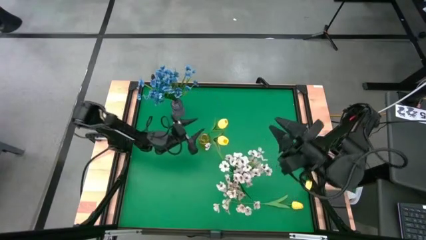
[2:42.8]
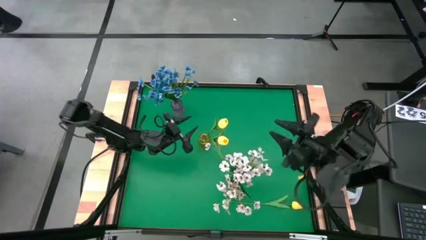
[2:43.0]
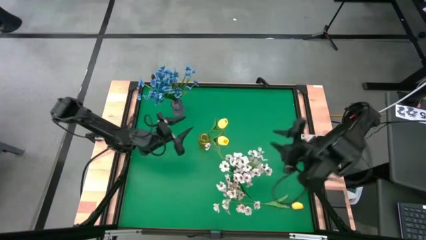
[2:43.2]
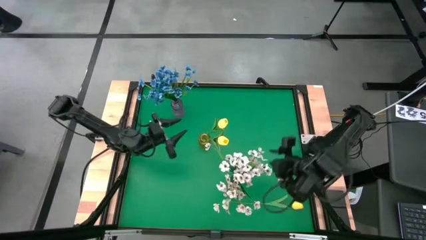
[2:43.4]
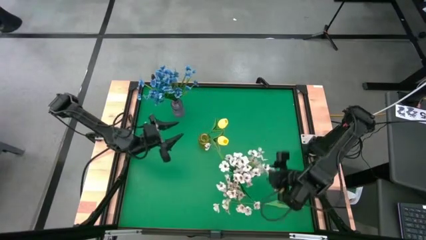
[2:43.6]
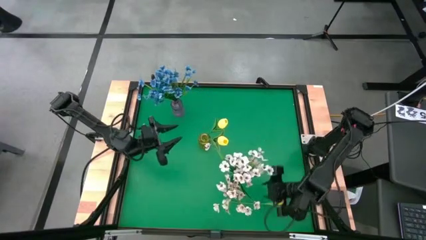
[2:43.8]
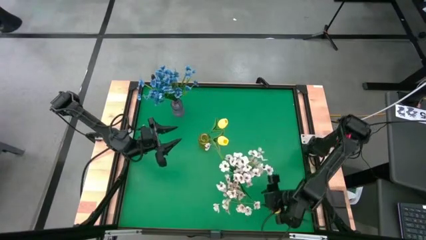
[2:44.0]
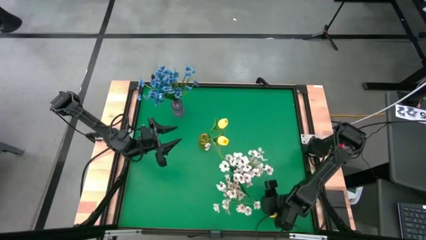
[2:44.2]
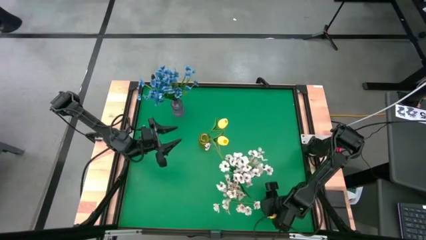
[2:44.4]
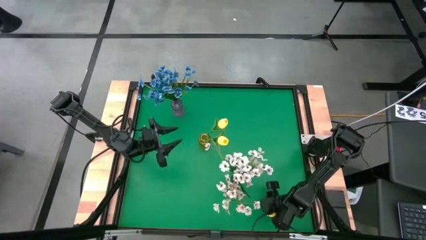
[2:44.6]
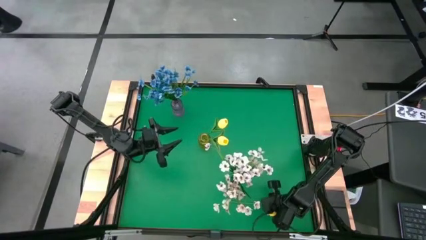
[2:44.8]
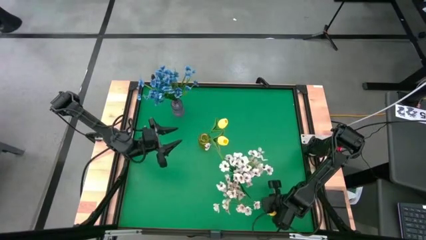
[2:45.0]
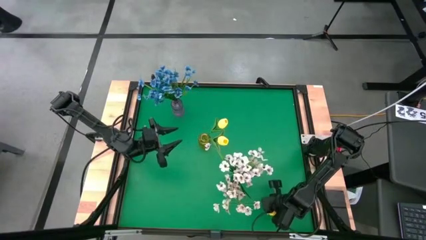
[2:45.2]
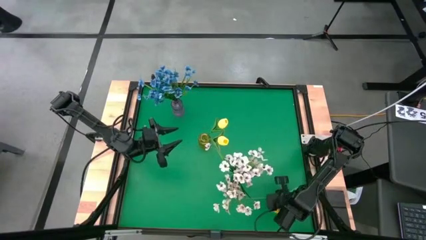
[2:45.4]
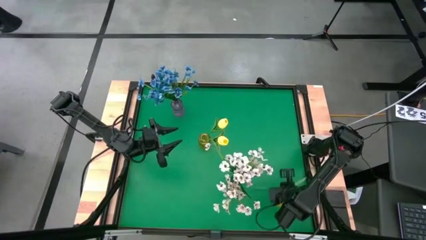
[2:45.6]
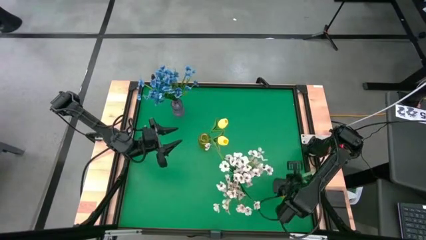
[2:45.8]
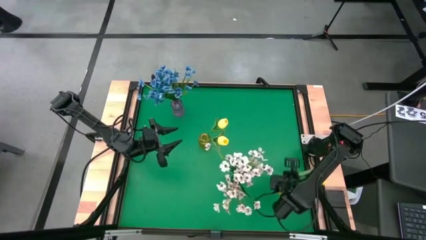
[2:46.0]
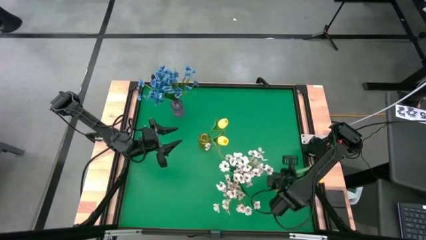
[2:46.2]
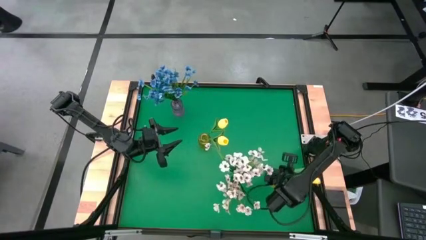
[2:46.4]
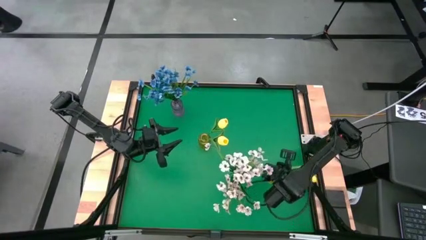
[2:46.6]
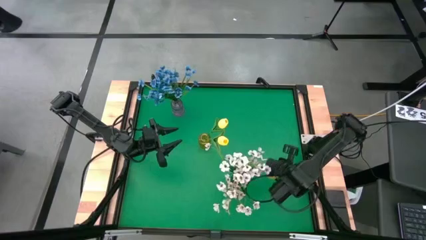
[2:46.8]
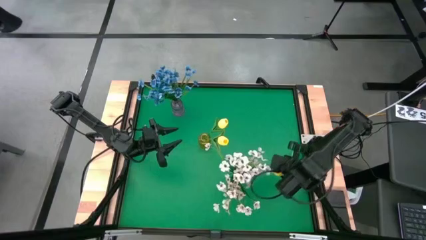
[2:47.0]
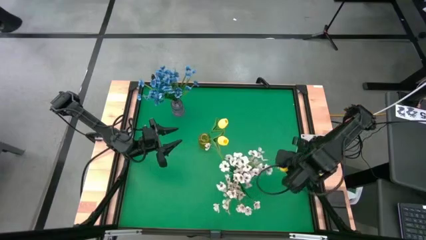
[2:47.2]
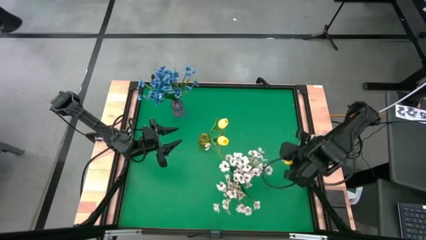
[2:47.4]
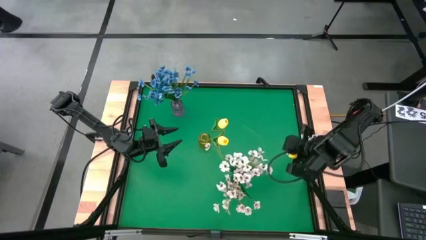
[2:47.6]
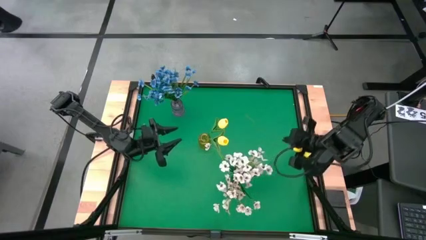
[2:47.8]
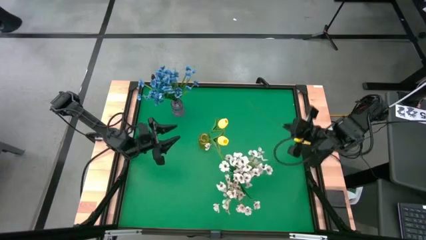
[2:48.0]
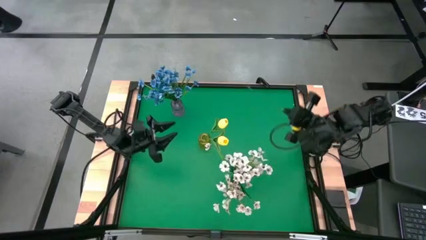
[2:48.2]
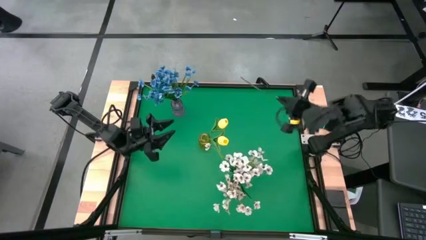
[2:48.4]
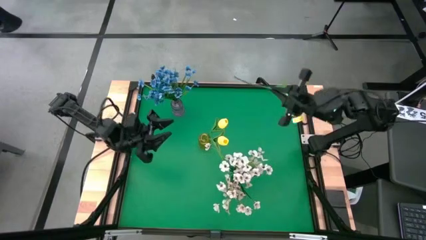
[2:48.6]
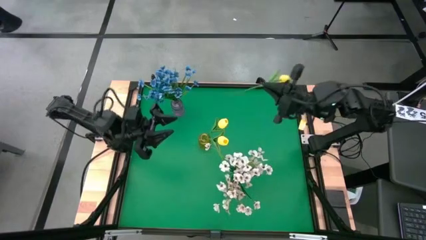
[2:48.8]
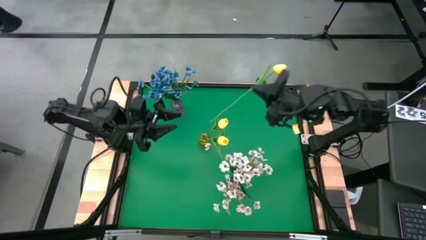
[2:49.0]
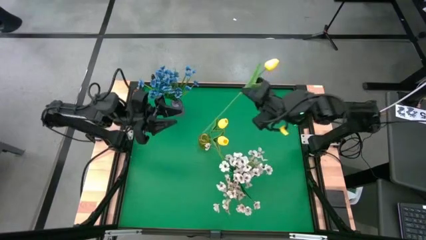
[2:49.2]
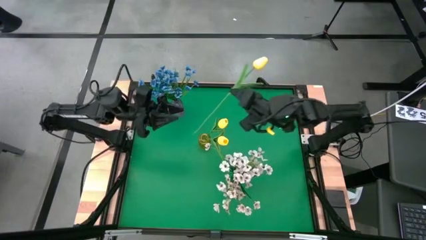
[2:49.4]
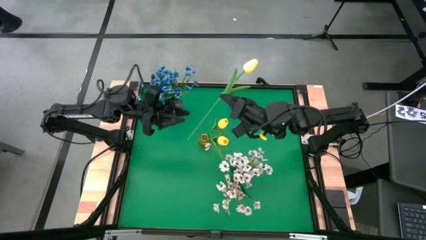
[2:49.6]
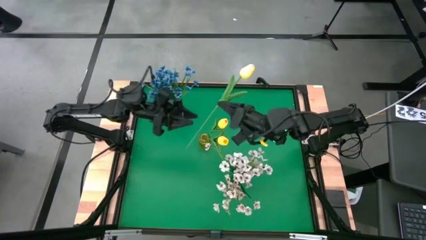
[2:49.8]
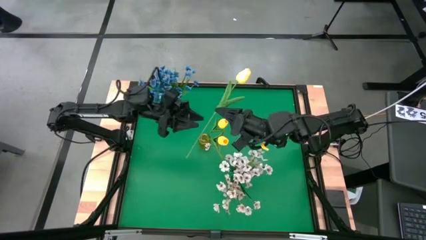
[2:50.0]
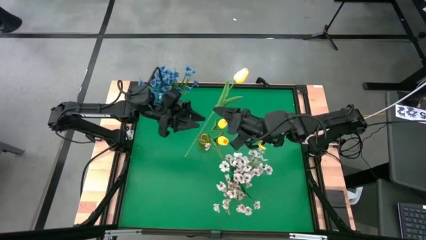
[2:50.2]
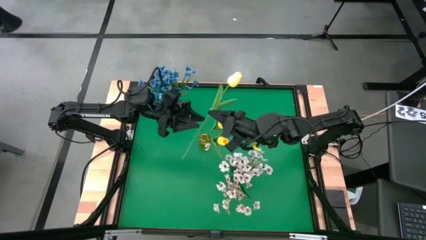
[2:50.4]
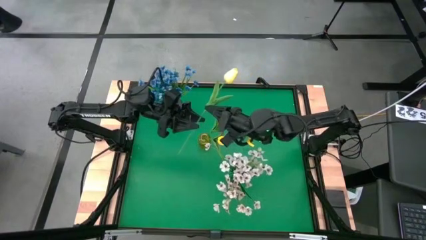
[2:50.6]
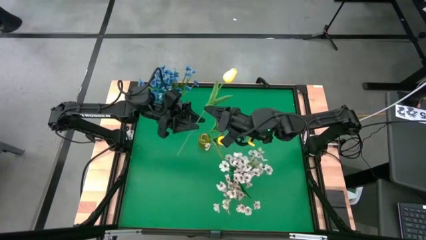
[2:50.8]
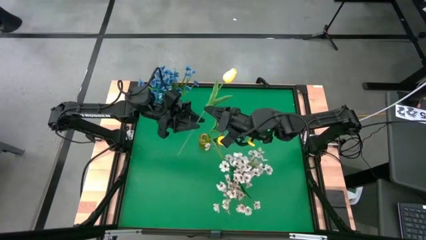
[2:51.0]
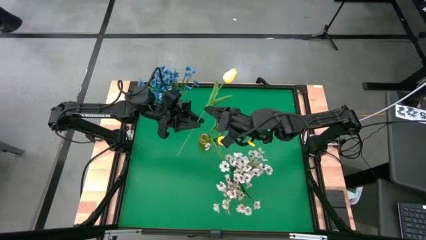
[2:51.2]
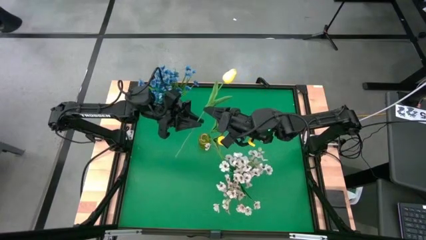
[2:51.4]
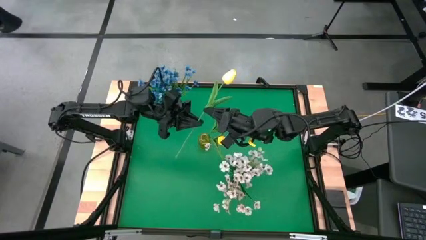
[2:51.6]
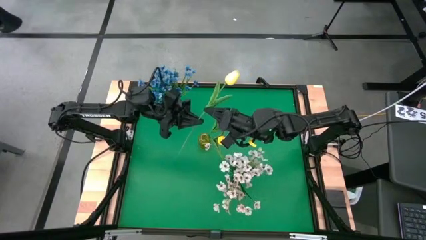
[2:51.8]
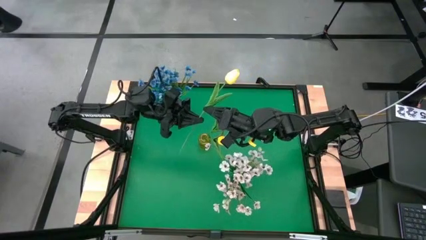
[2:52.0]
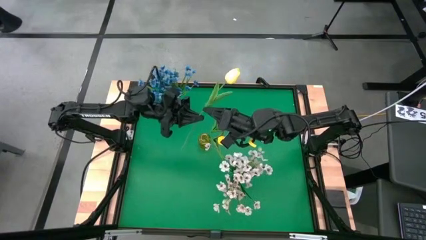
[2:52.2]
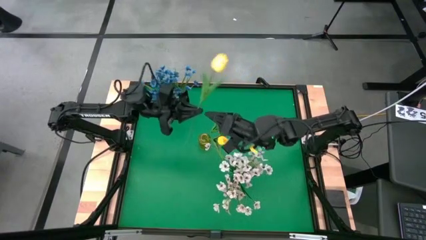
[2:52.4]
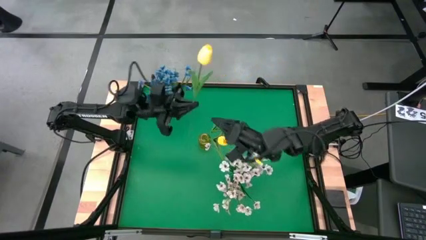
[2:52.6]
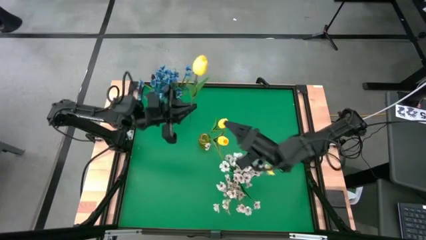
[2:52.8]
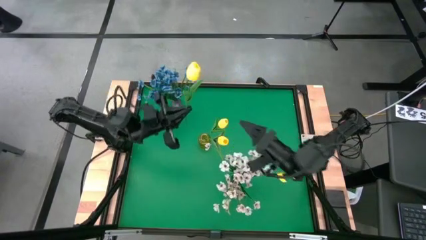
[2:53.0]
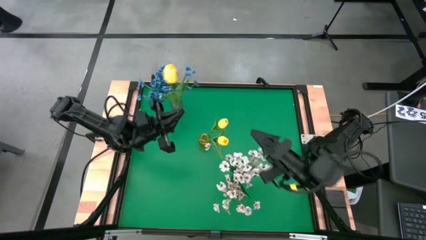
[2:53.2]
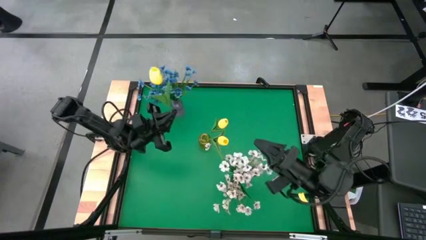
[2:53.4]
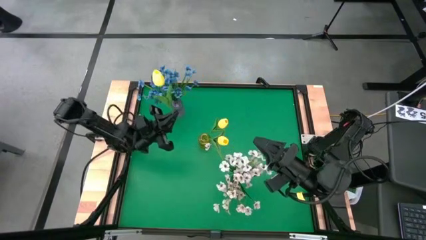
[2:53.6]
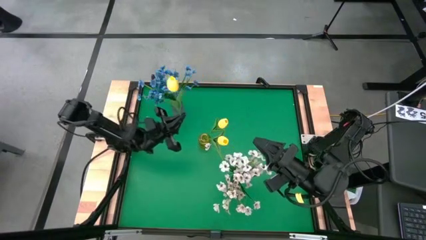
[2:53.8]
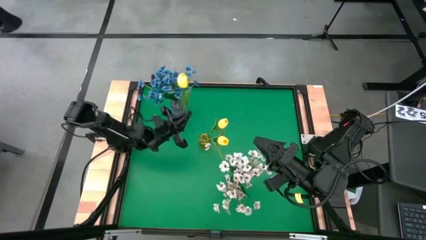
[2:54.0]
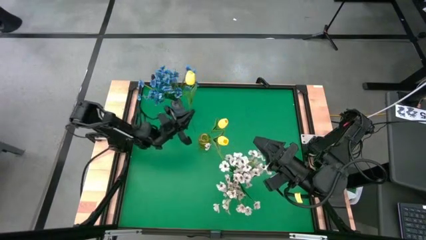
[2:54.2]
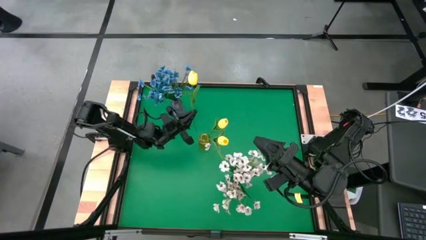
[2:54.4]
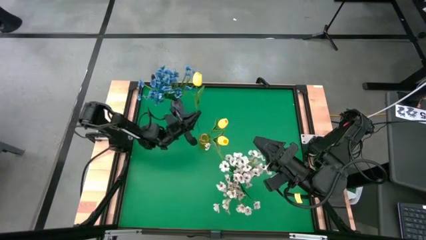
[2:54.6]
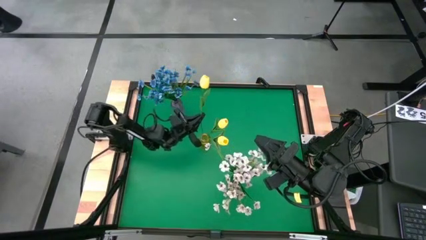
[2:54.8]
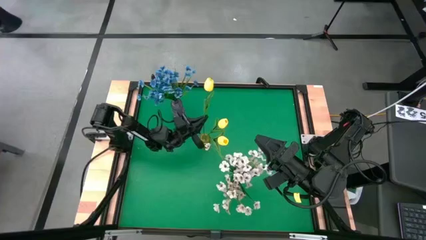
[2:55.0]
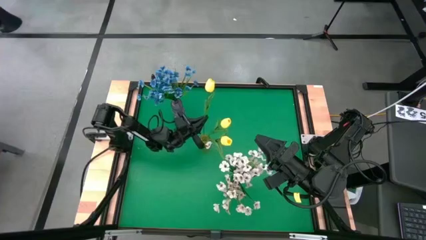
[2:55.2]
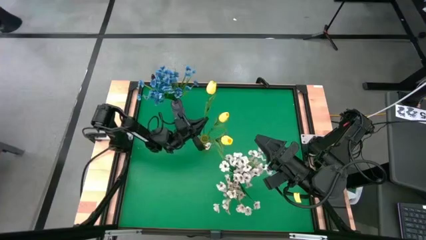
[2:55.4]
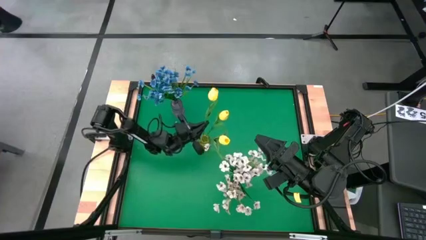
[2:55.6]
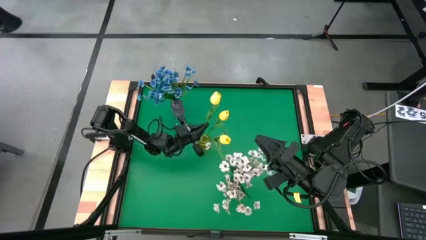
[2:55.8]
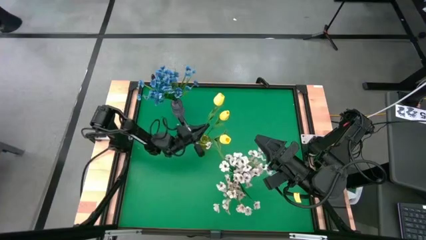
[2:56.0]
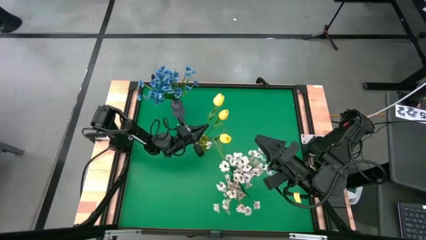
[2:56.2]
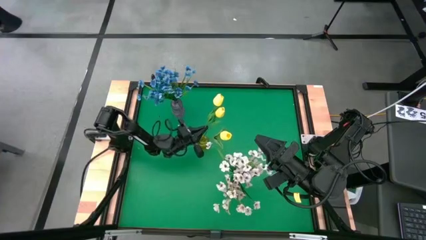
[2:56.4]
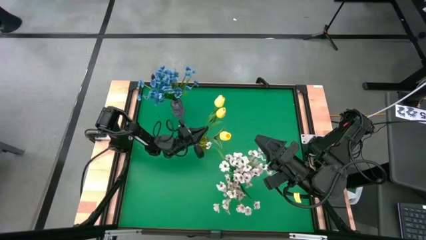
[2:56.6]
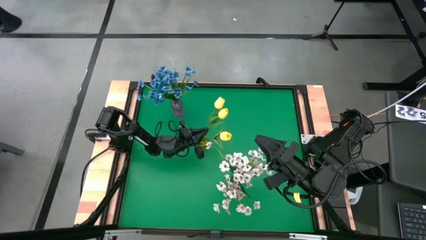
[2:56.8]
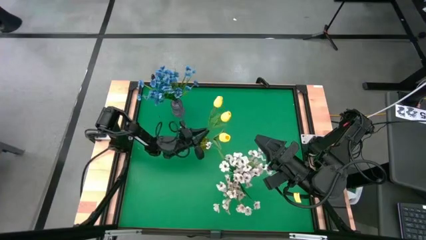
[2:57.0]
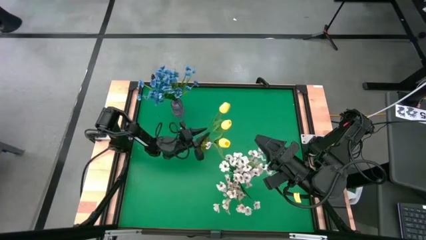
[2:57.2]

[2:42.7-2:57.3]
Task: Sort flowers into vase by color
Put the yellow flower into the yellow vase

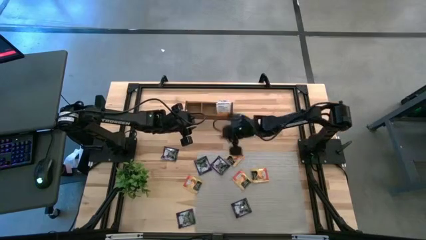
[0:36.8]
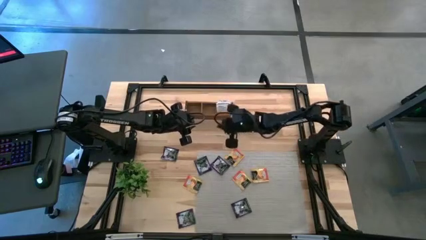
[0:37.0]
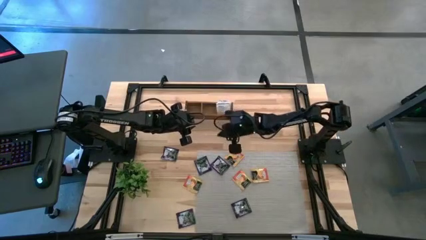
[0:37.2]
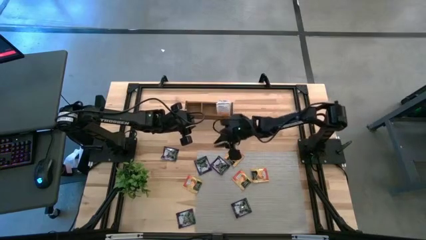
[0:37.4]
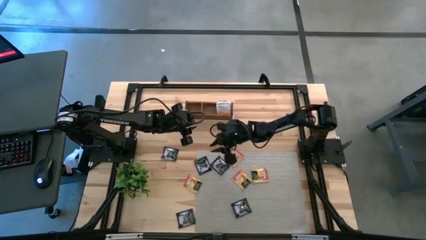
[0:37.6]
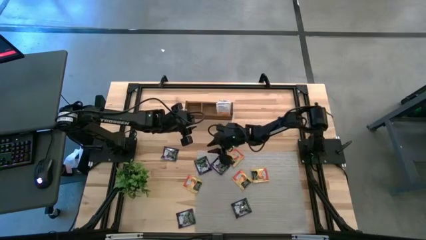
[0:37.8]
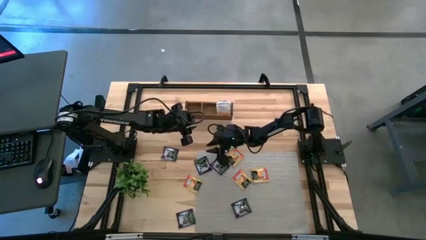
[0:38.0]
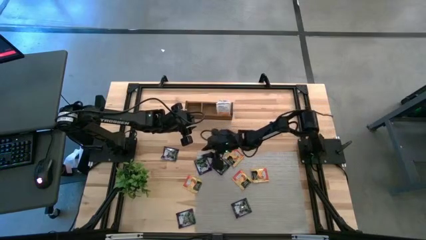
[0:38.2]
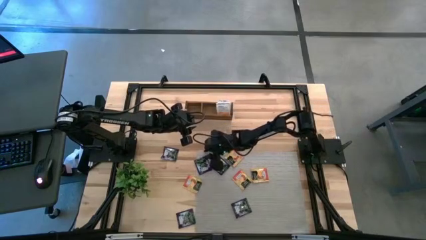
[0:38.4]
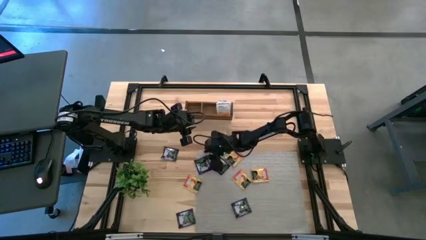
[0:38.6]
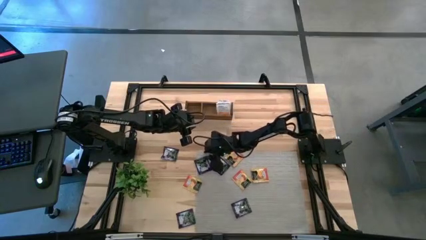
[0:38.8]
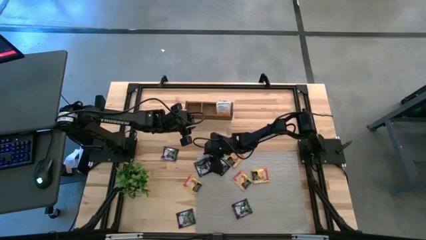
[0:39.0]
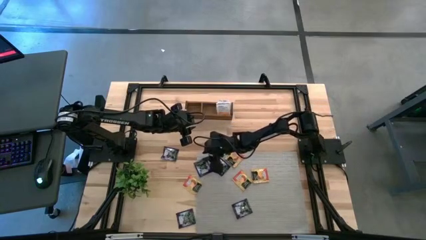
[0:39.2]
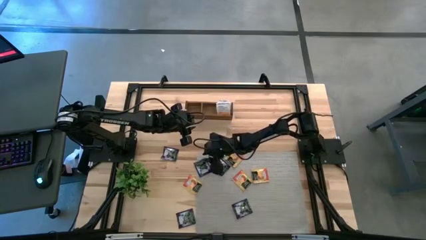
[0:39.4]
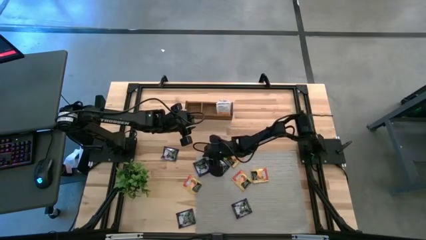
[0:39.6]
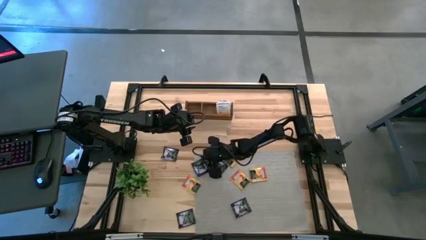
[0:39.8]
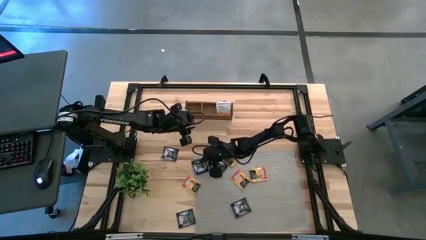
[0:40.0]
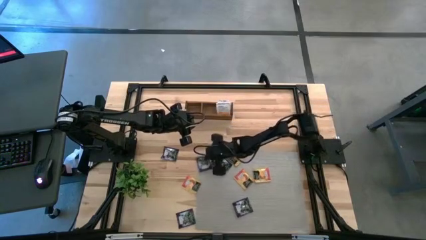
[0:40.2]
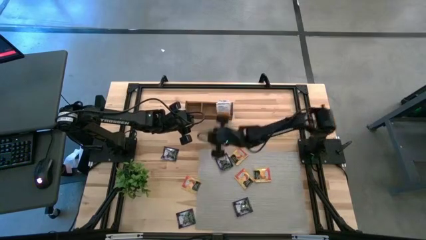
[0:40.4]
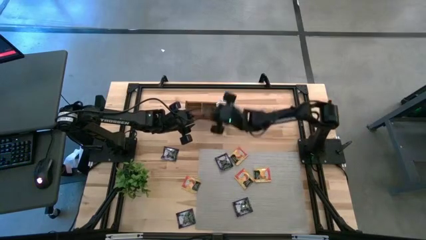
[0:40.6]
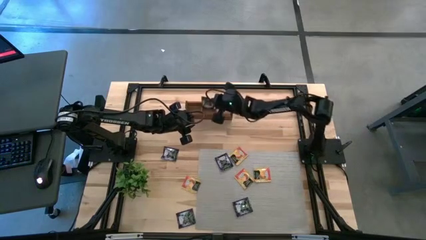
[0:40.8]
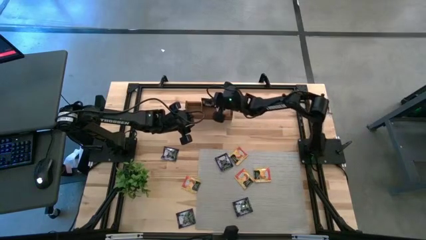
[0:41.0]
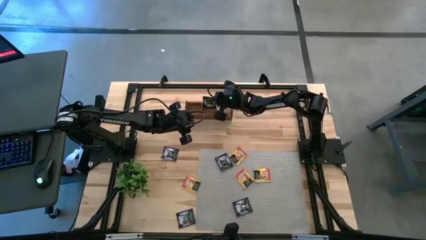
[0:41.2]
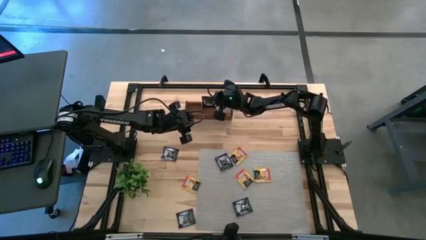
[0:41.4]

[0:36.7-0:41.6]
Task: Pick & Place Tea
Put the black tea bag into the middle section of the wooden organizer
